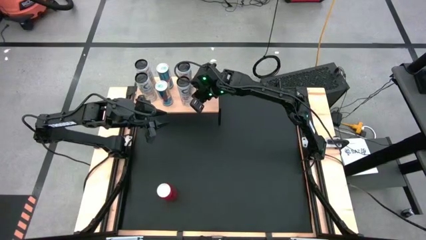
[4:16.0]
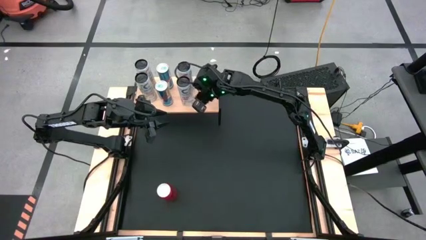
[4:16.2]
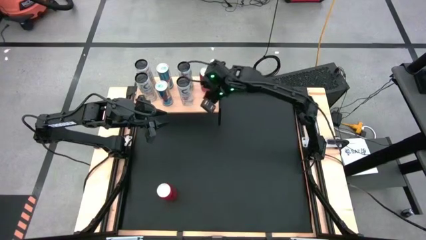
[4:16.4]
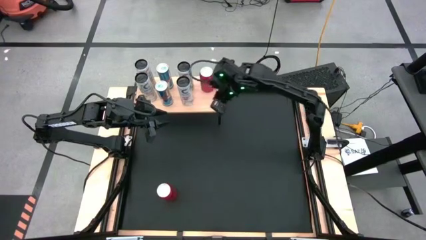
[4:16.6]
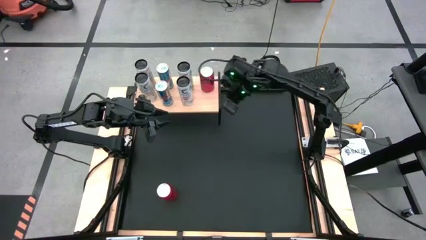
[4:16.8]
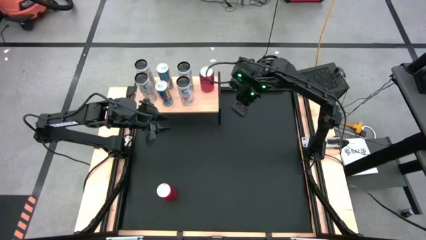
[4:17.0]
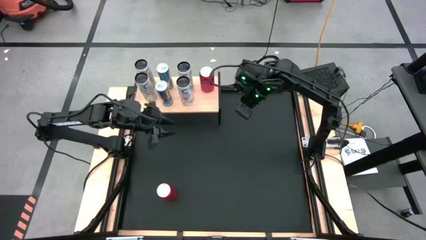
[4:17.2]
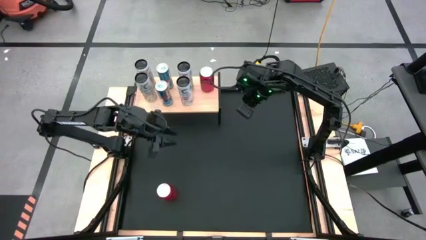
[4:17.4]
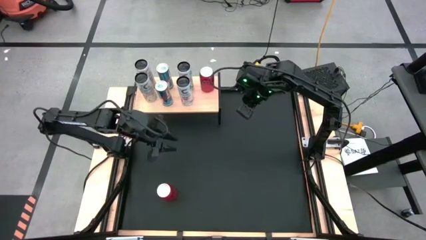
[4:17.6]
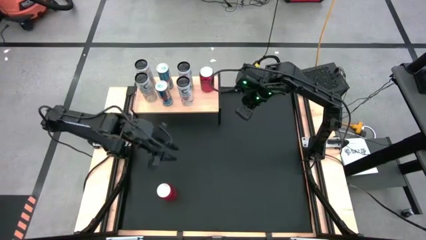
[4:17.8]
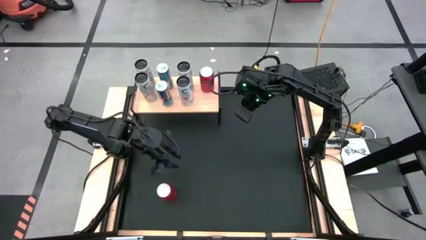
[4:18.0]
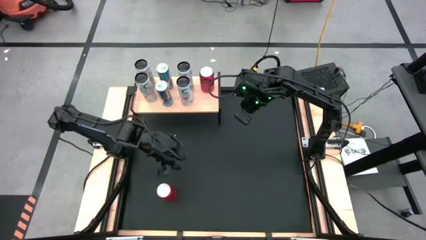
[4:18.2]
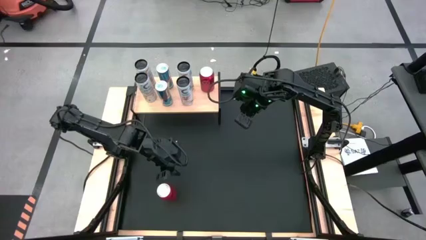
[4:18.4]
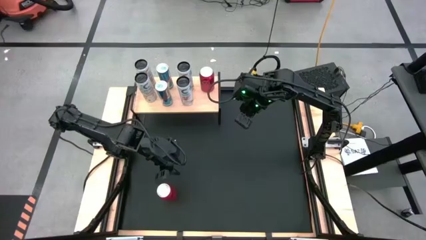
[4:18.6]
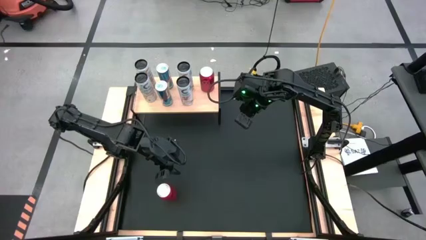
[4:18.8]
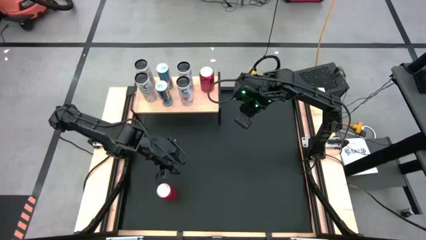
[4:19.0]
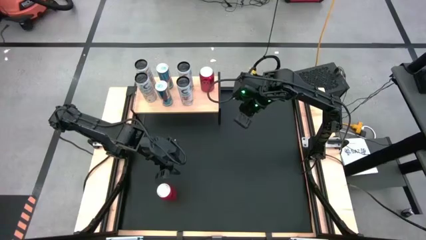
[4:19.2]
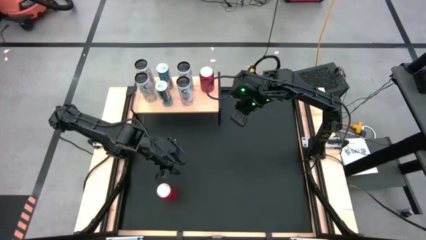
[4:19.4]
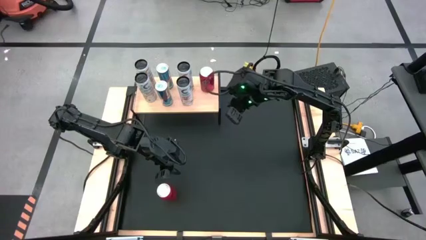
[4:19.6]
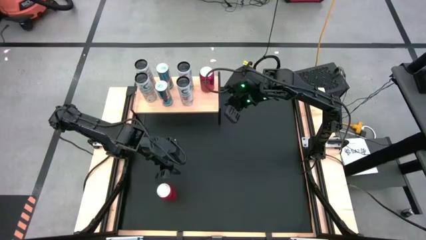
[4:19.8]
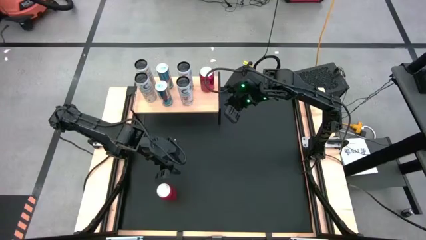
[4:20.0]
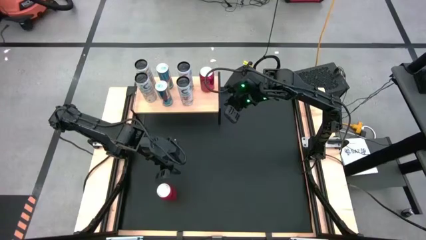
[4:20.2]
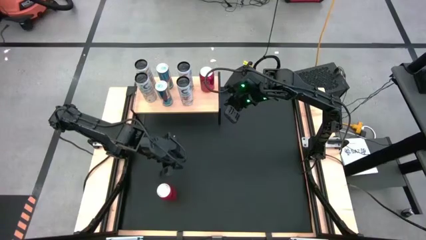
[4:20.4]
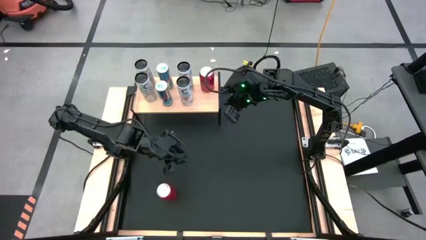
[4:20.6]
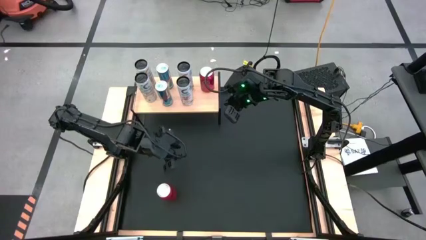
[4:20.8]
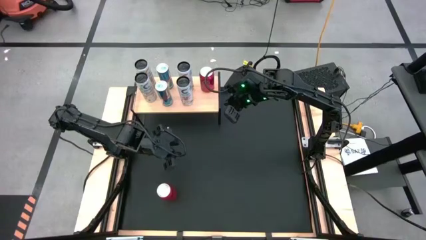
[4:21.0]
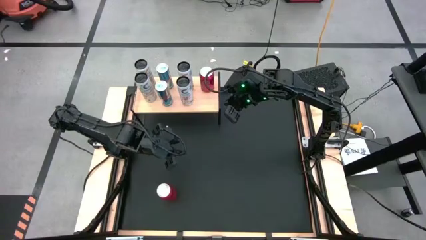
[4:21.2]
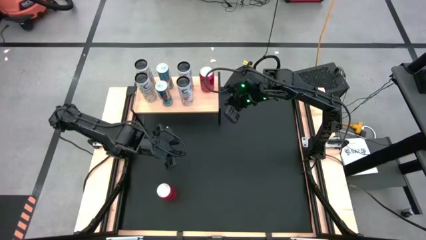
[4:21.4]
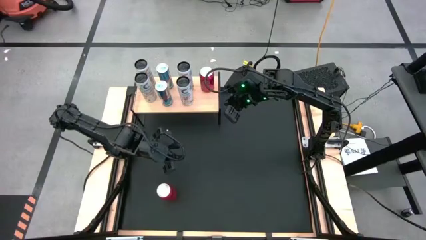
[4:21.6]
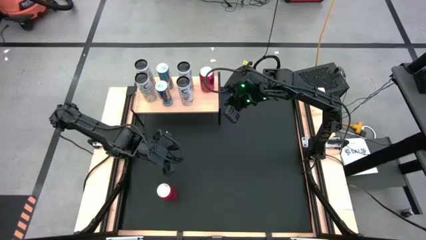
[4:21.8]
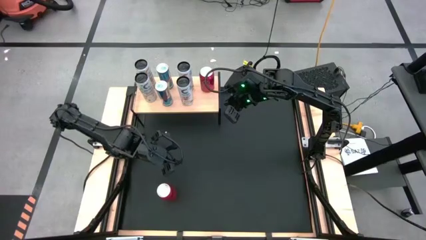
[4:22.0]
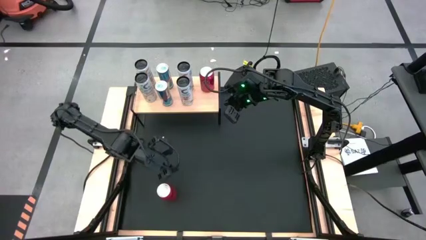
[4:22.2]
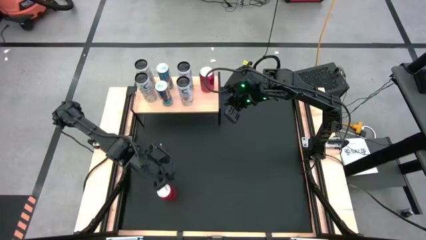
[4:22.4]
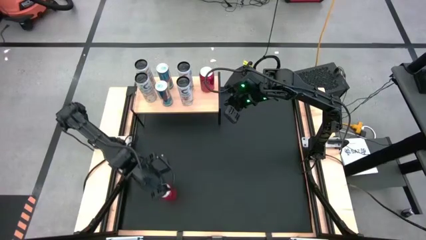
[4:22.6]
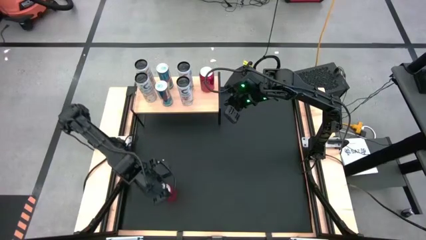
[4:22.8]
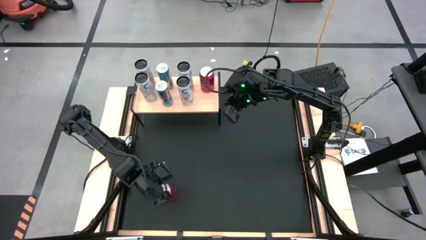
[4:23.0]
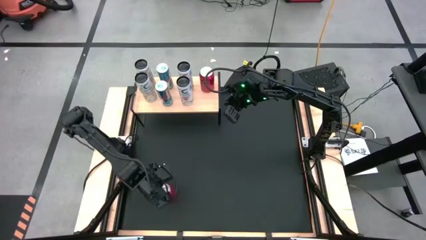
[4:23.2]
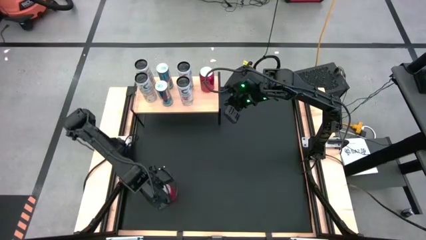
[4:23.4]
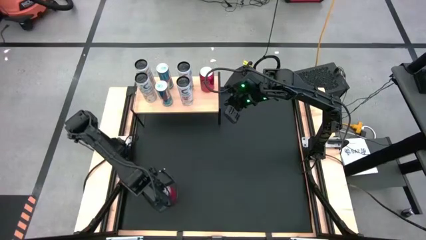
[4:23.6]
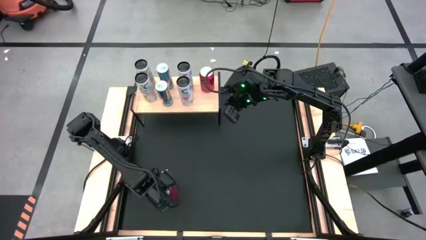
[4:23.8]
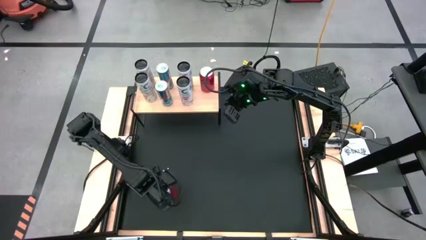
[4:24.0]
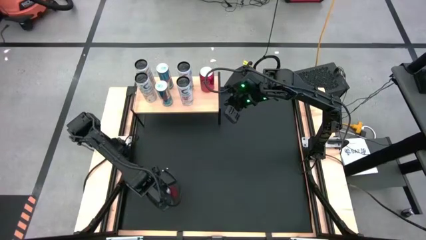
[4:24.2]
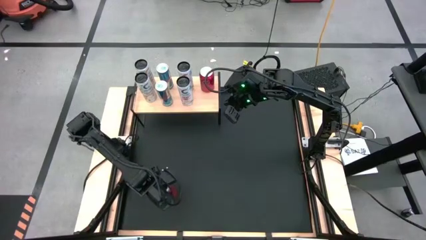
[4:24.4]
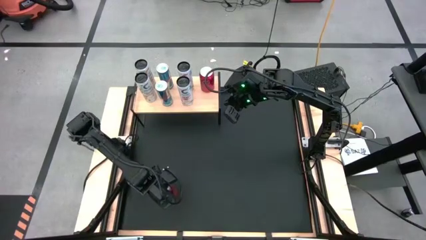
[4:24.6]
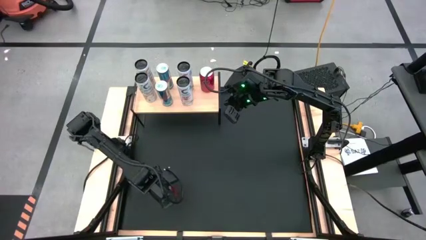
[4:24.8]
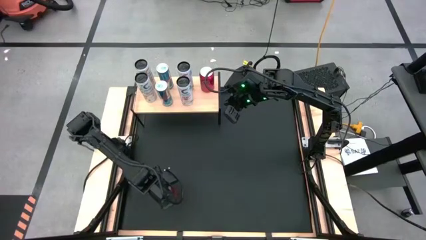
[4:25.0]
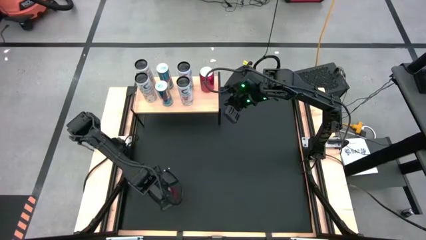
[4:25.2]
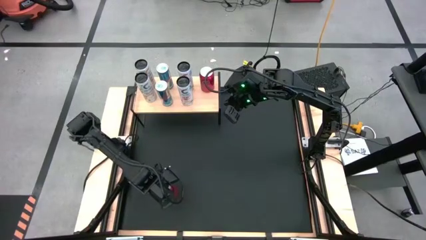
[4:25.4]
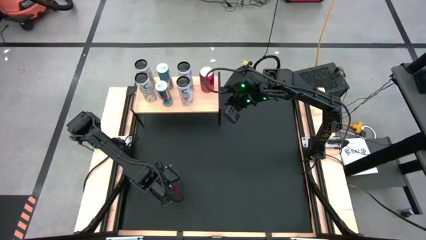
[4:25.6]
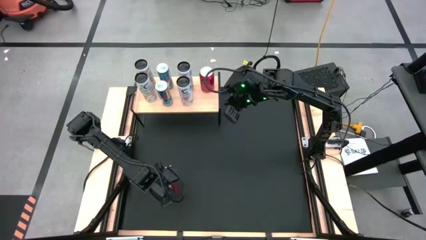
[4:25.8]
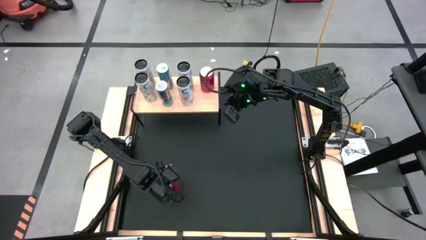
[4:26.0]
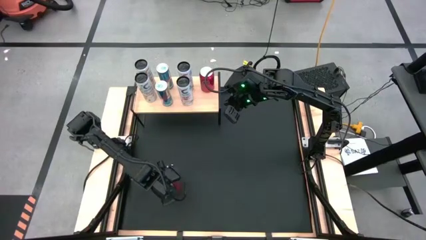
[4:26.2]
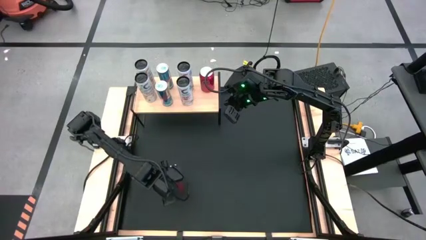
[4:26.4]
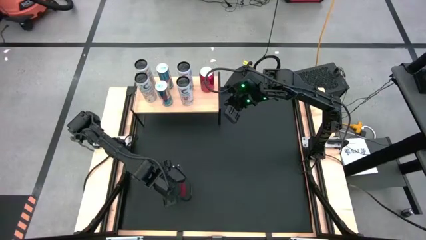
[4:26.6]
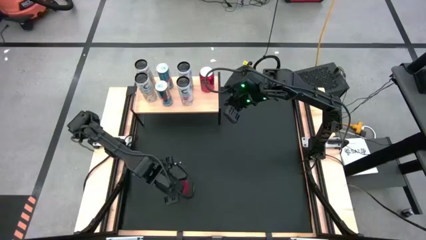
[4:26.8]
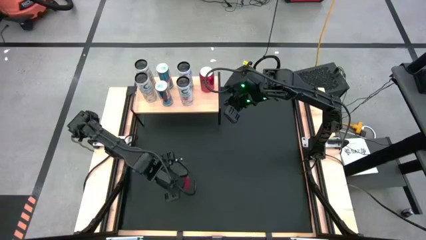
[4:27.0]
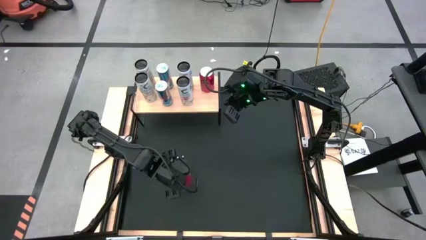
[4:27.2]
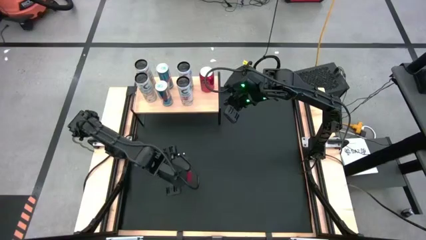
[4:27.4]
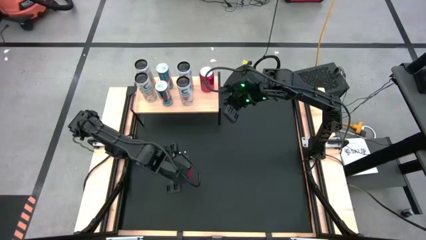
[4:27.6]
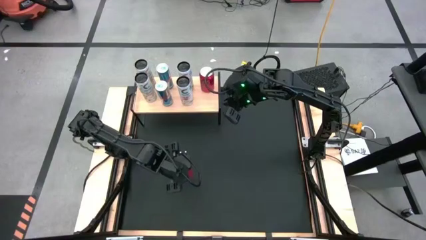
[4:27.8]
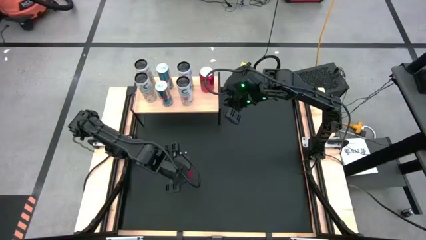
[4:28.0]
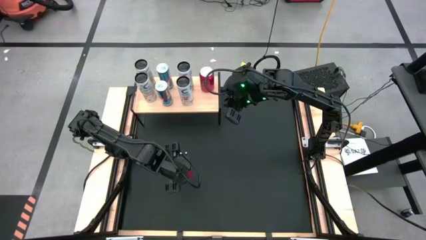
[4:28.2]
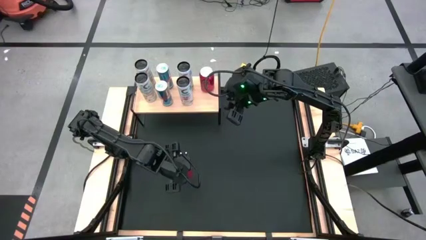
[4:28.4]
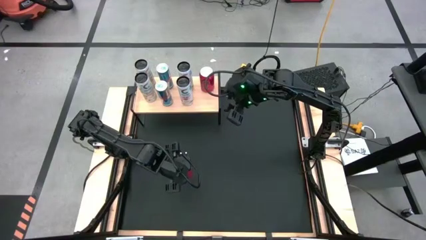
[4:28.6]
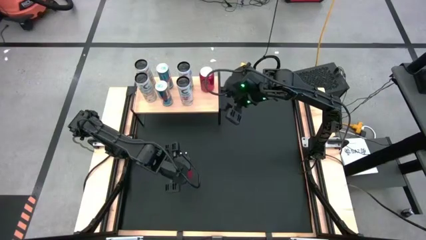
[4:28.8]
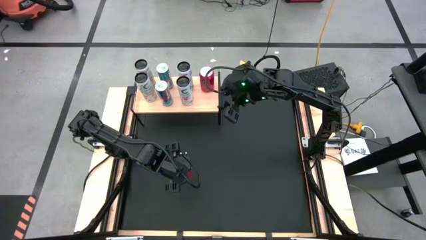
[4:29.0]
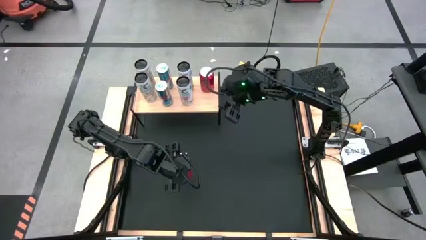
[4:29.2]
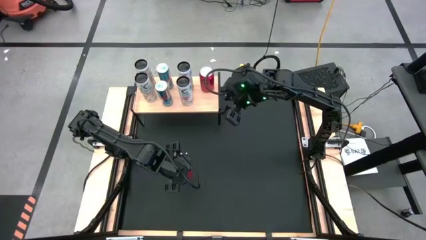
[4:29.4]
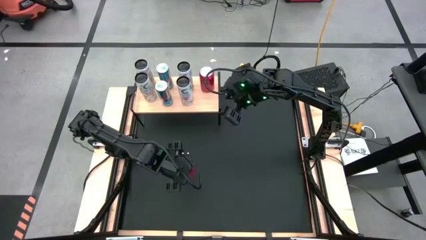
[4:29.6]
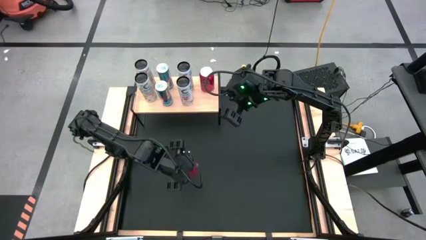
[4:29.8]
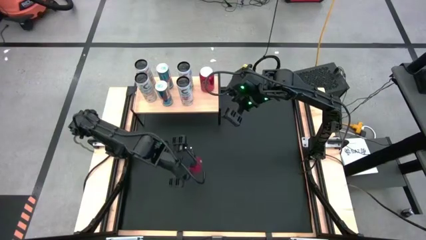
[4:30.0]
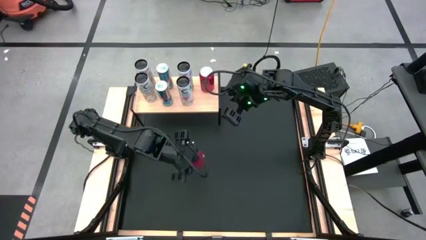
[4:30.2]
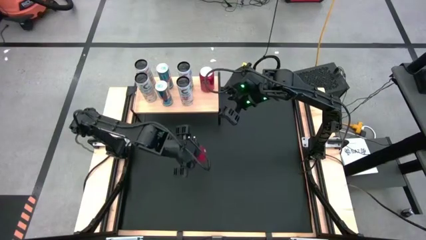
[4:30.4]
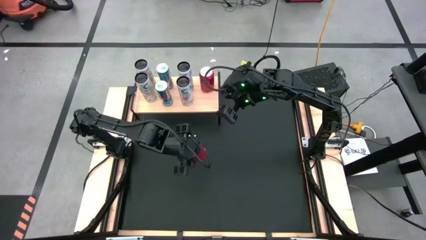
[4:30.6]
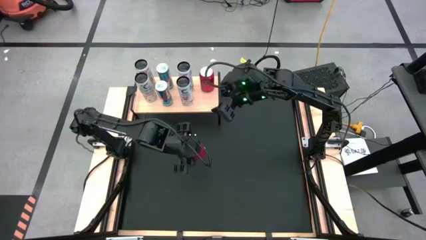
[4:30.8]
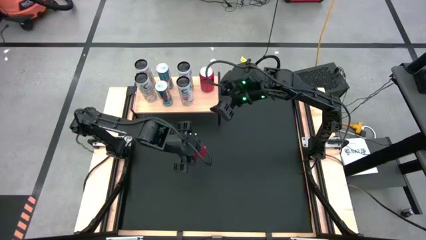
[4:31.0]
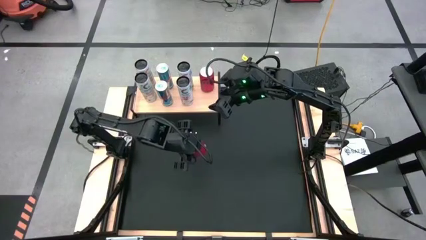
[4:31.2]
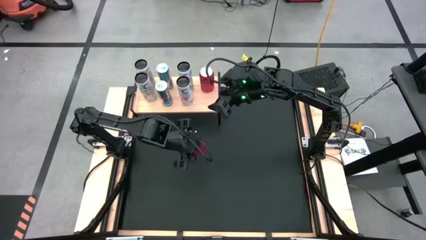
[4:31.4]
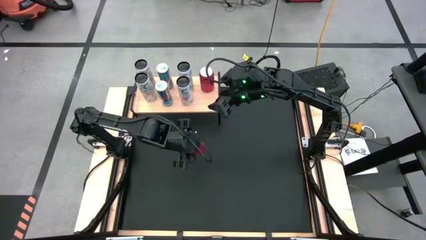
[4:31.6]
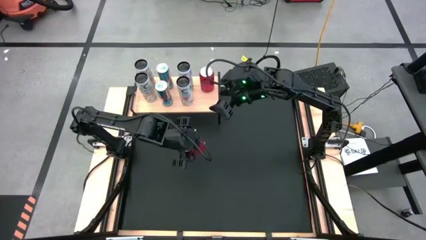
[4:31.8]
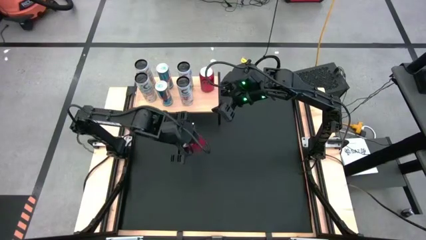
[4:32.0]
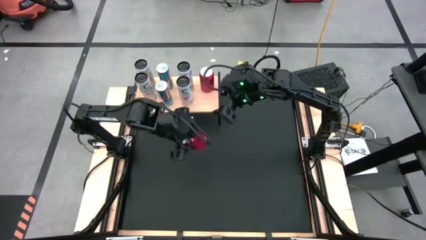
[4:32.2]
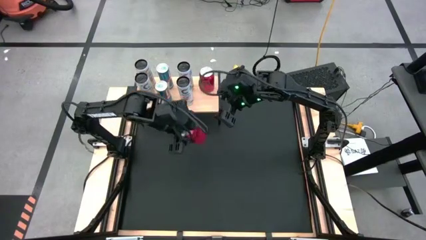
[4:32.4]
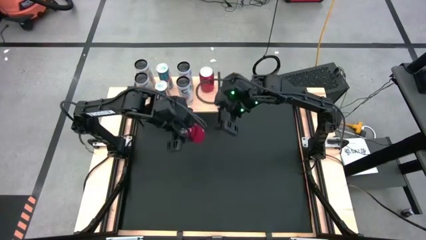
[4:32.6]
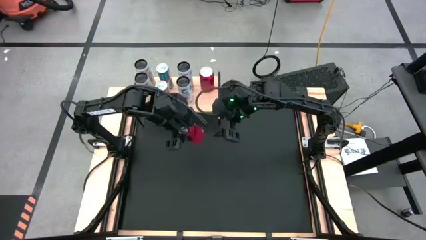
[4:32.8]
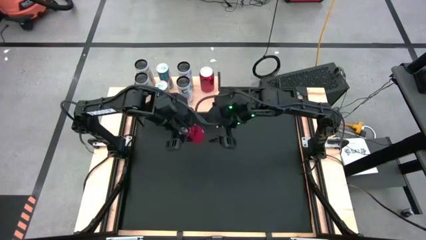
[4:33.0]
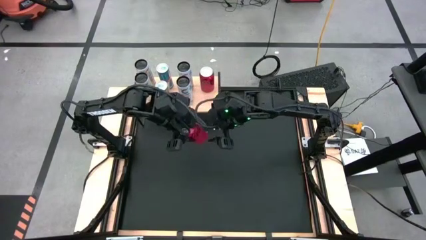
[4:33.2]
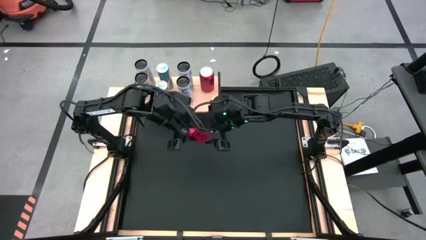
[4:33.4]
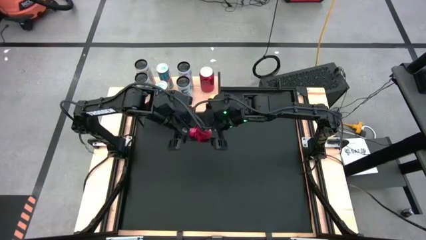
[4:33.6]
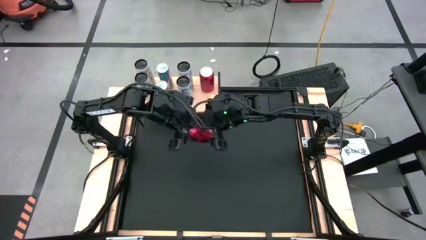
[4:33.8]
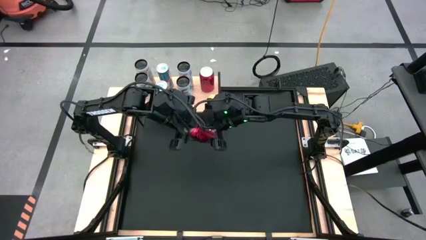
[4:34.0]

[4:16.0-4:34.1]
Task: Place canned beverage on shelf
Put the red black soda can on the shelf aligned with the red black soda can
